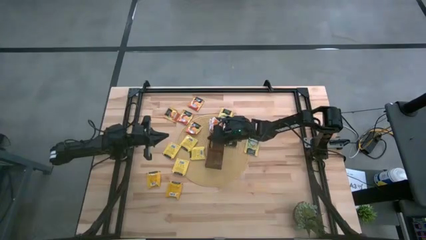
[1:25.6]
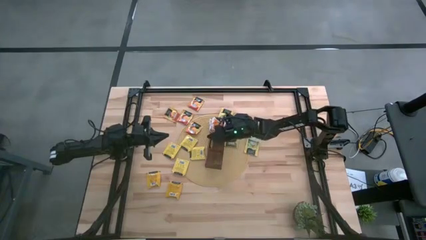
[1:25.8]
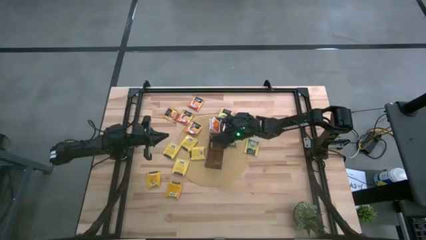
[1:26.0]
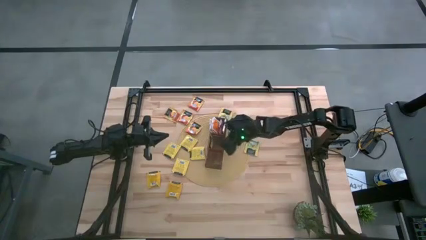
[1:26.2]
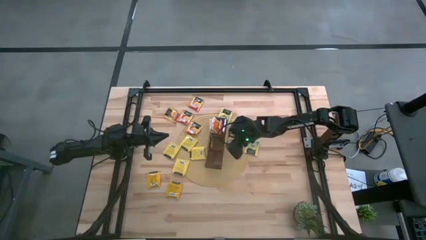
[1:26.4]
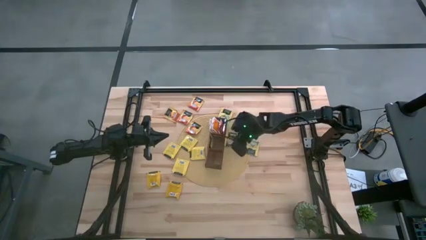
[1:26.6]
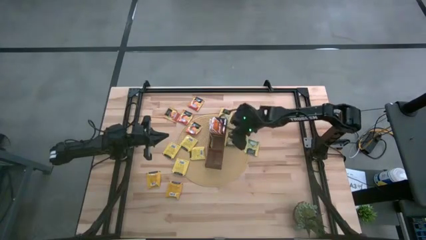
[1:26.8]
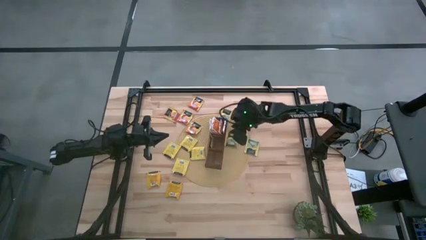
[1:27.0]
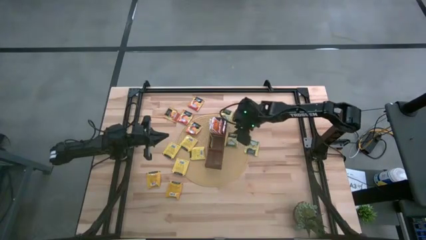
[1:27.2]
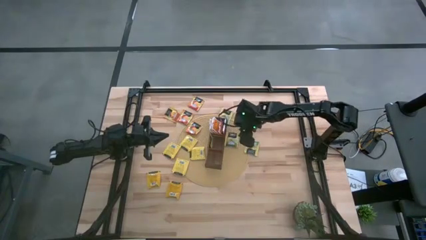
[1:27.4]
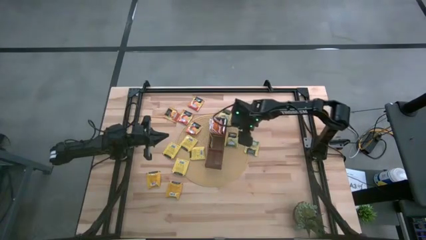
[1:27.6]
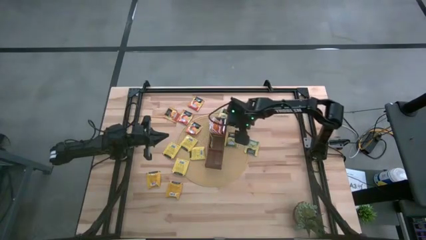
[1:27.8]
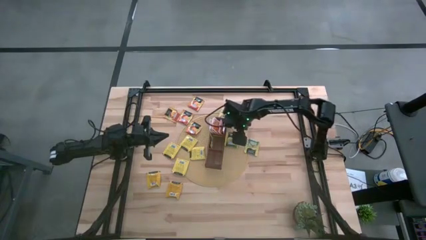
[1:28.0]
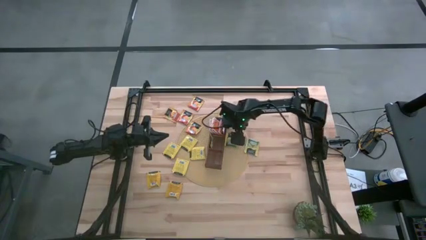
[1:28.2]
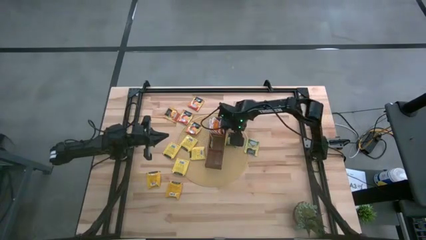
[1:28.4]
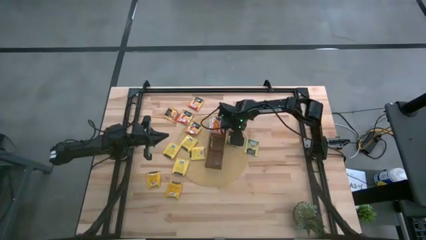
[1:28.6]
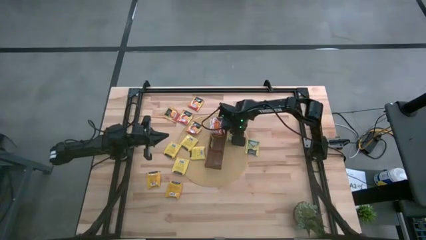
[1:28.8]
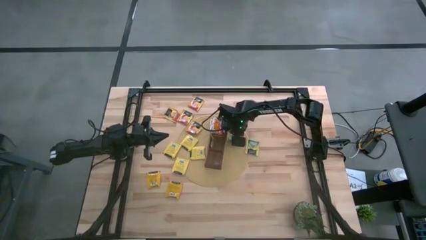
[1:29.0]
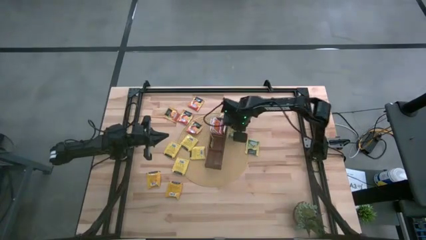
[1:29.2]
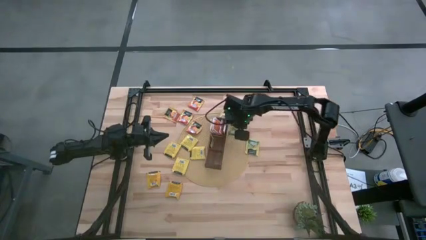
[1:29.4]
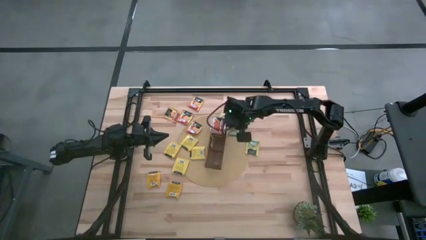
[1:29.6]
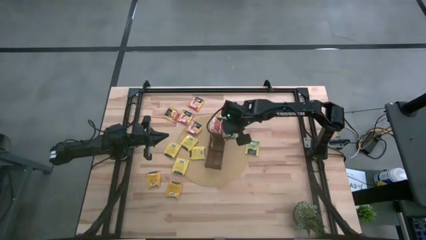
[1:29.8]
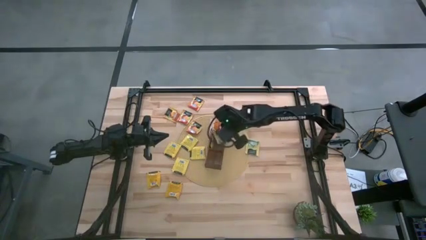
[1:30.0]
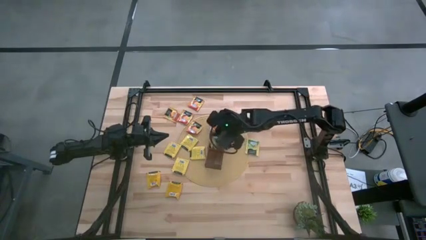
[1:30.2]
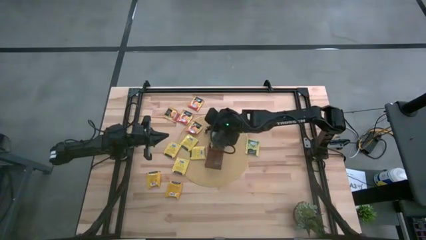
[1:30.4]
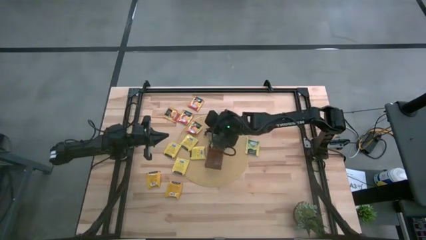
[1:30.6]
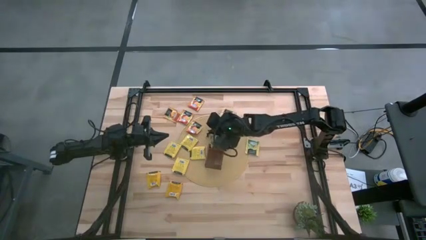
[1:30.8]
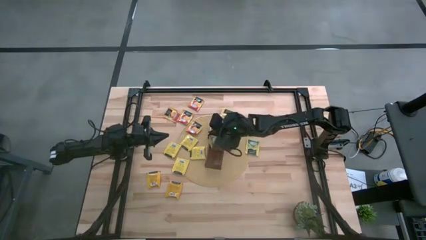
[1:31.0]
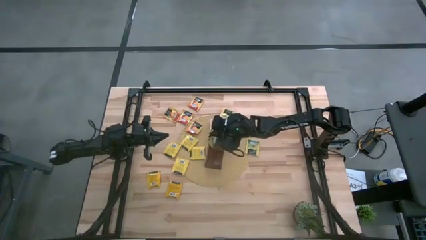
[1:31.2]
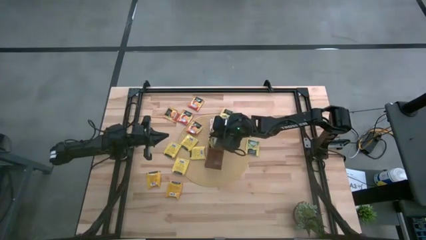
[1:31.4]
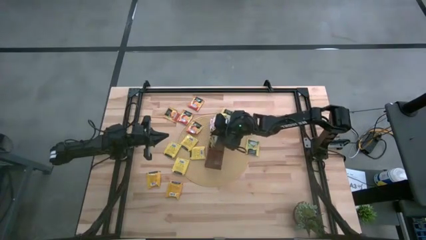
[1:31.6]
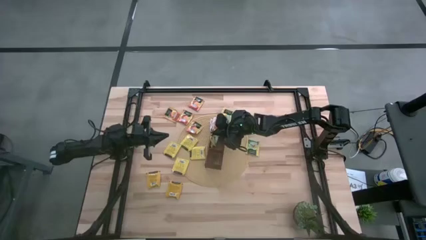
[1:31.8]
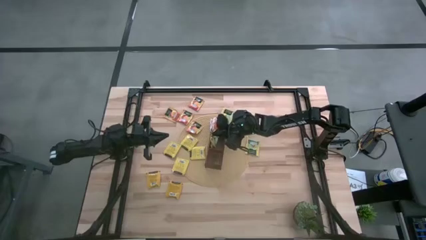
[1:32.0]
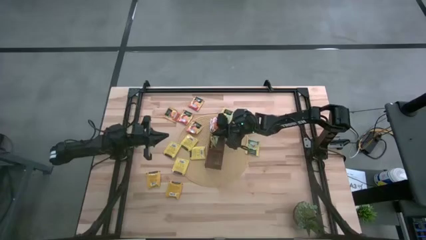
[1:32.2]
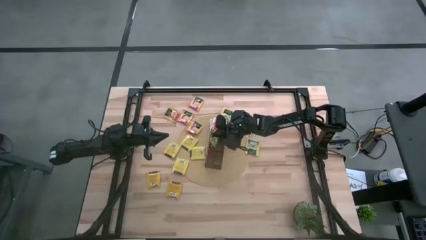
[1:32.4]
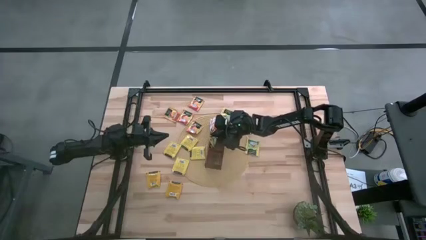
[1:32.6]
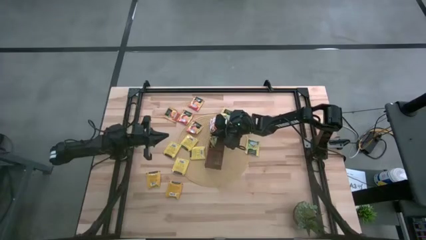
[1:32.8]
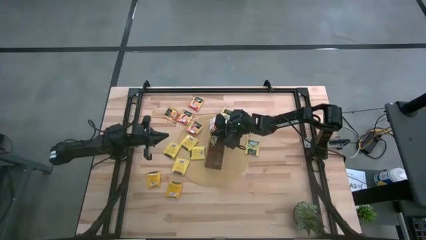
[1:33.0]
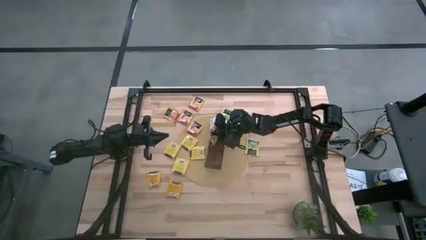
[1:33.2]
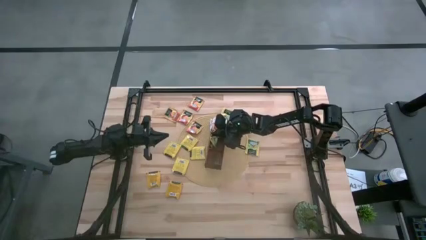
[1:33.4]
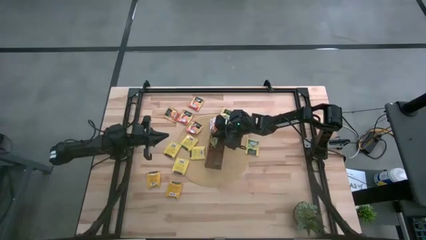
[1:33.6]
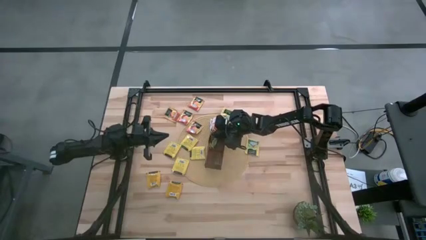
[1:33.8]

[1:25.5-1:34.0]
Task: Pick & Place Tea
Put the yellow tea bag into the middle section of the wooden organizer

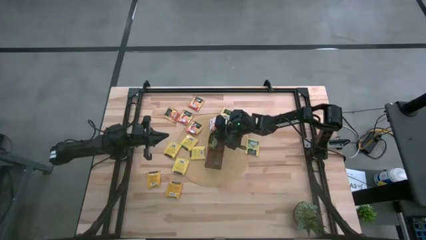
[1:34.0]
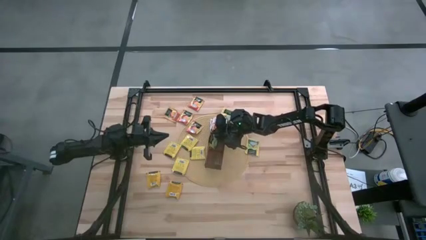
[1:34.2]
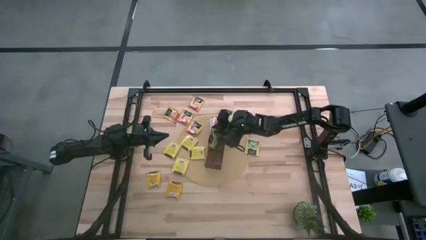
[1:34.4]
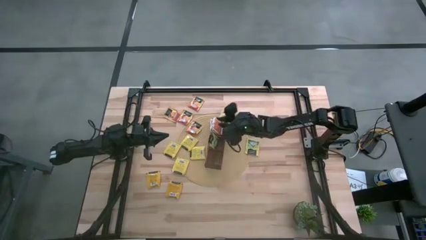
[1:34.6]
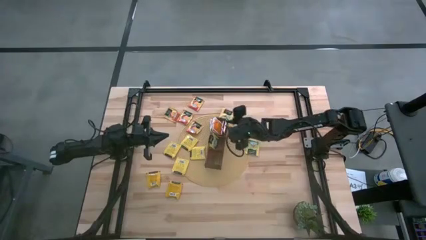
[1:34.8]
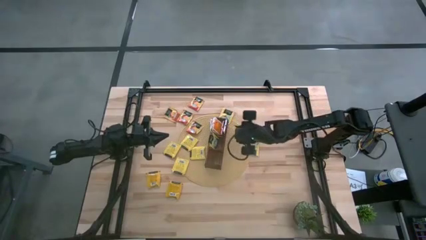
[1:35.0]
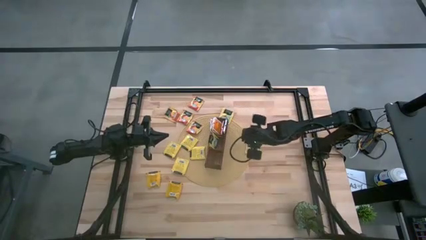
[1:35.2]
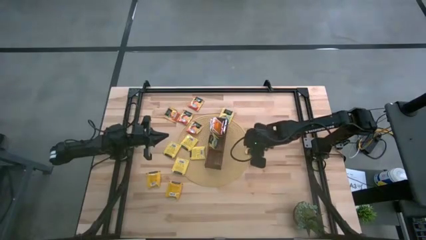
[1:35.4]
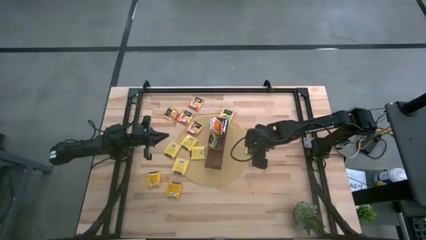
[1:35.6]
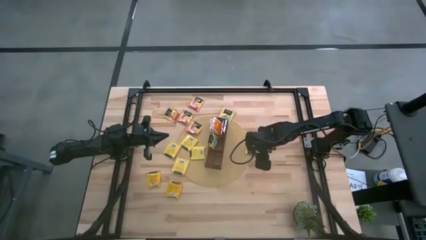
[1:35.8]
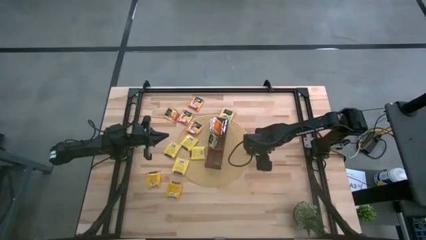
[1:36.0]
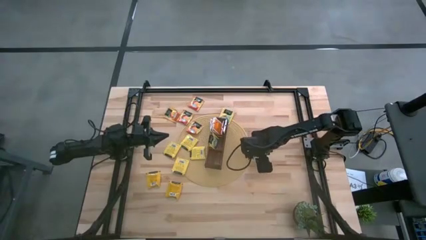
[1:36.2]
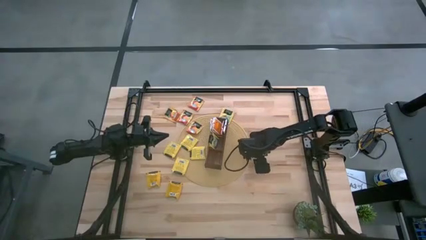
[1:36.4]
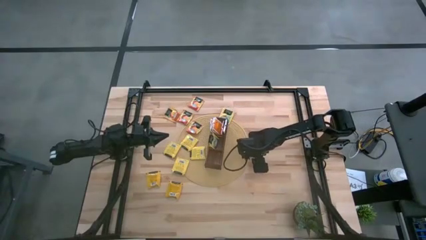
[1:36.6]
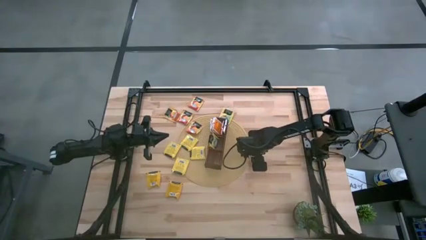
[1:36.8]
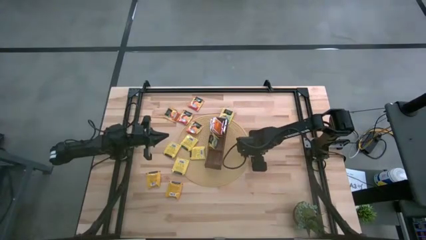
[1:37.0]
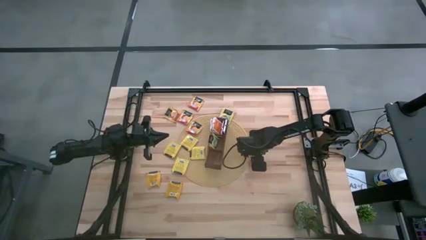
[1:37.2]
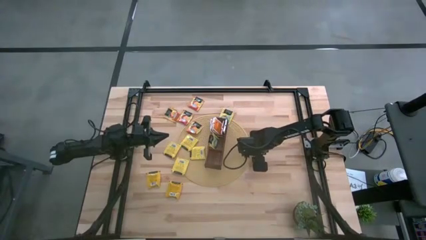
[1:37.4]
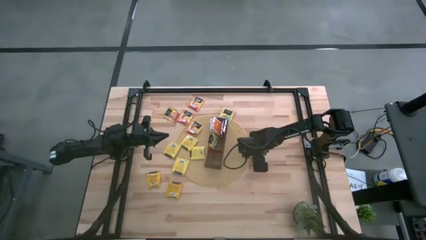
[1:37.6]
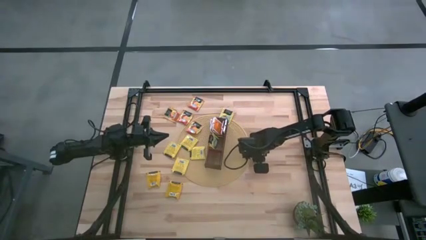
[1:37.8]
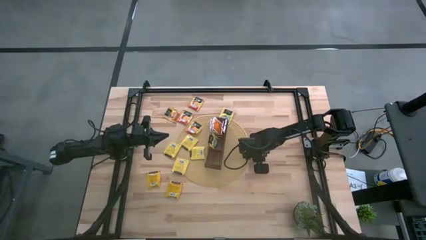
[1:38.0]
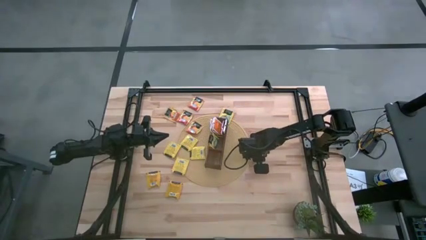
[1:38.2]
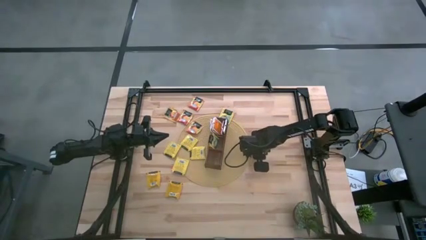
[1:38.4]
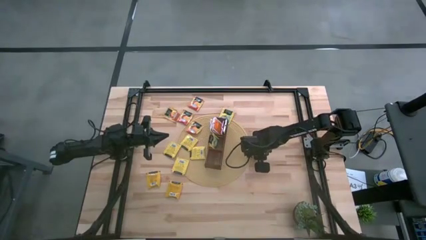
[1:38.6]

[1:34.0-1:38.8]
Put the yellow tea bag into the middle section of the wooden organizer

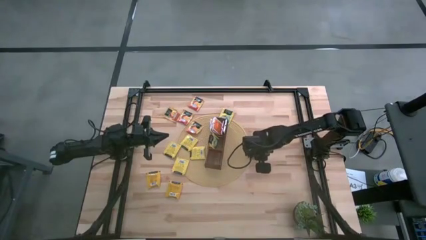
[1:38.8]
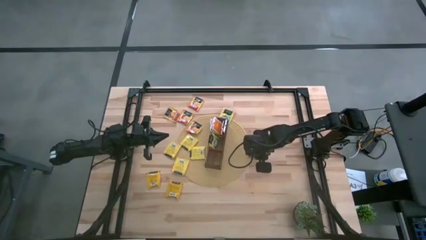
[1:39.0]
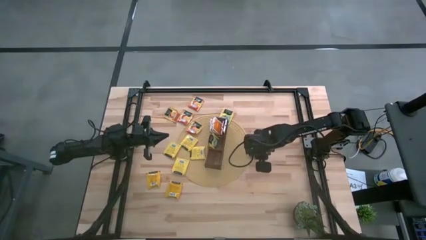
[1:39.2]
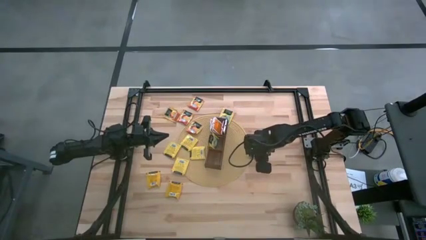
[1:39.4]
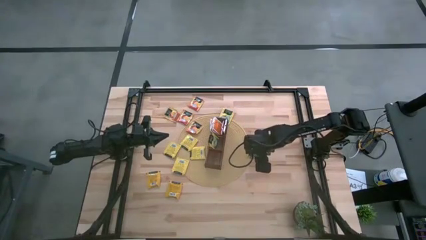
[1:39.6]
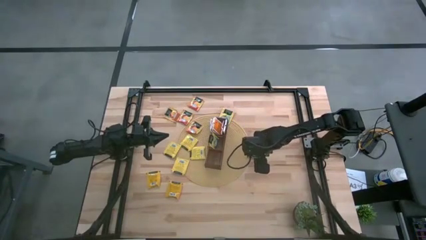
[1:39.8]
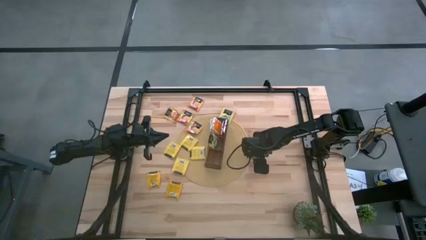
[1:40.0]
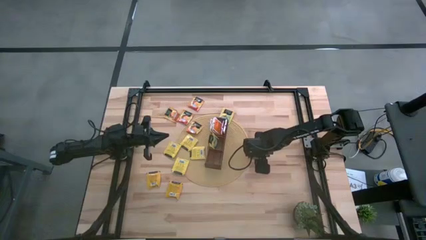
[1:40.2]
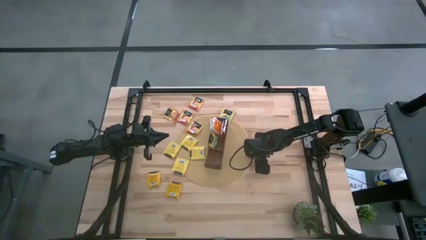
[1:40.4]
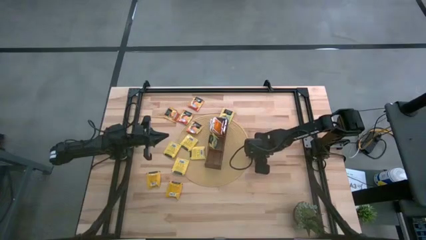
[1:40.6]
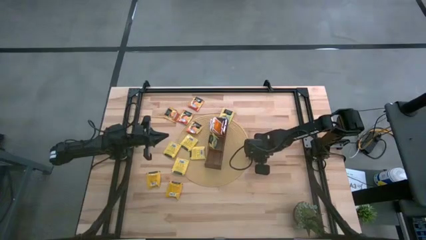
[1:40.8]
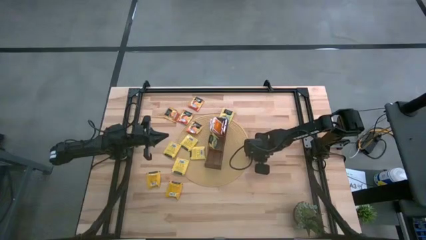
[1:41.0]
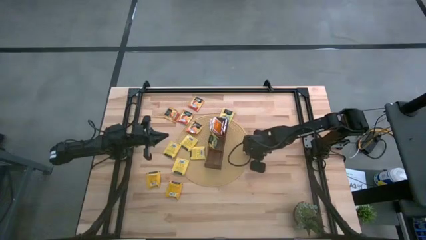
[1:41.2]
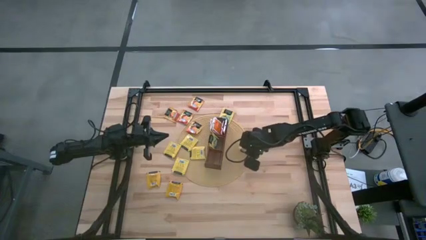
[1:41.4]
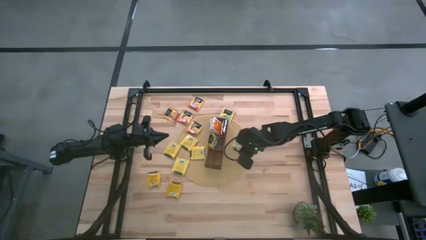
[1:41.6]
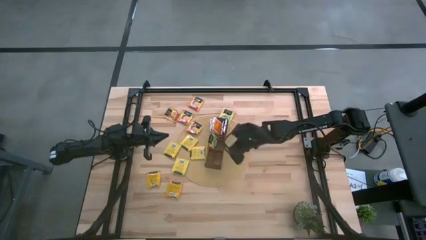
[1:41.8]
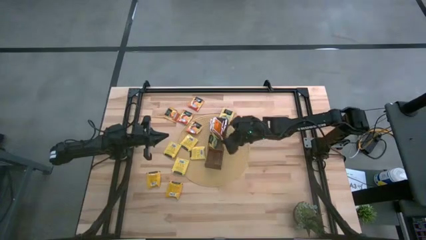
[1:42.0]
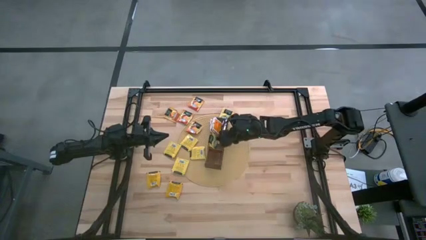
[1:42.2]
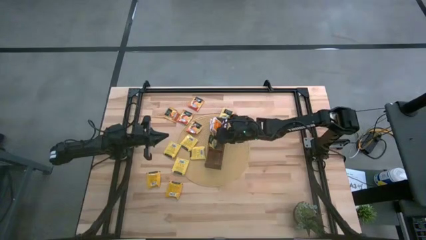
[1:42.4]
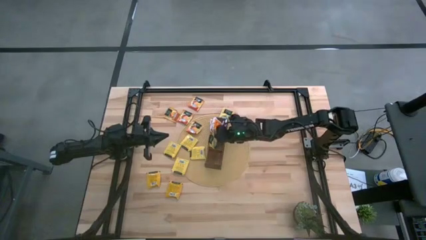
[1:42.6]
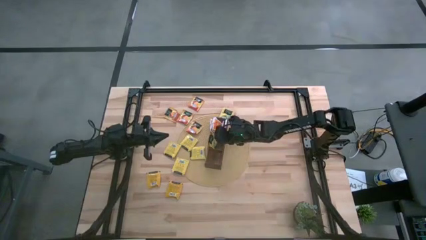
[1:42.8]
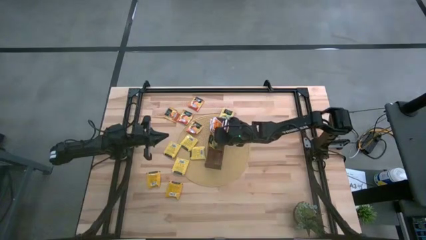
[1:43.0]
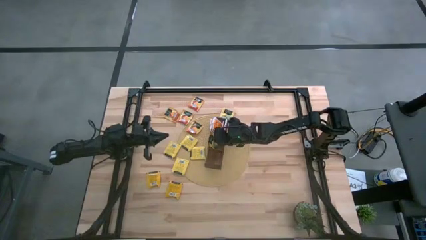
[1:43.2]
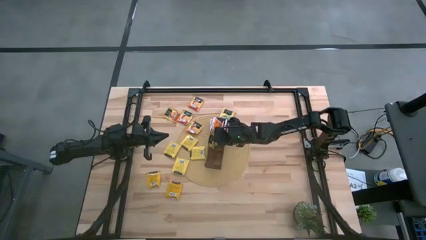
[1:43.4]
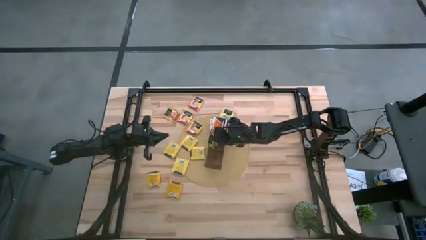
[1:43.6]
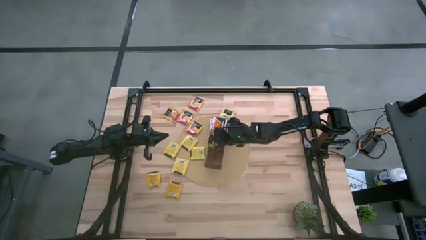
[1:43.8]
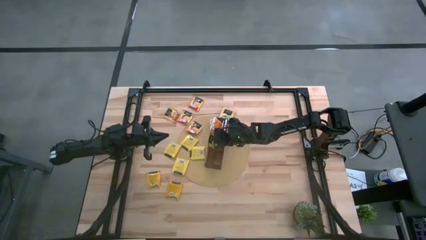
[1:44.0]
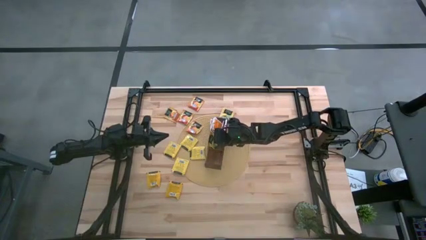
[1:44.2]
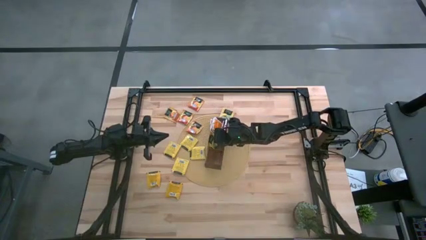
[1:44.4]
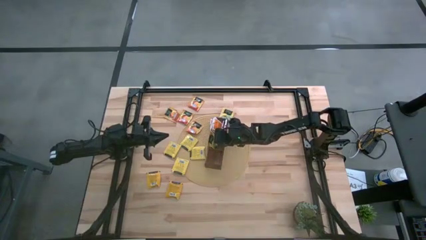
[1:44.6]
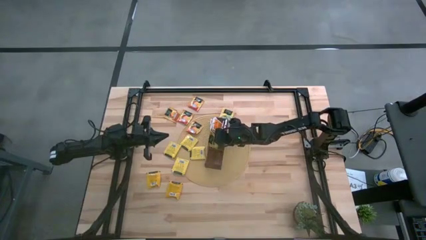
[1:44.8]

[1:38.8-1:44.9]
Put the yellow tea bag into the middle section of the wooden organizer
